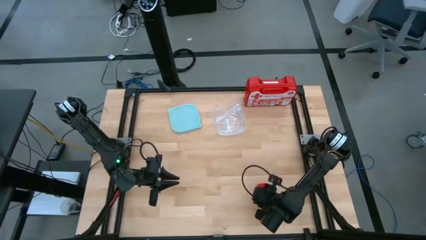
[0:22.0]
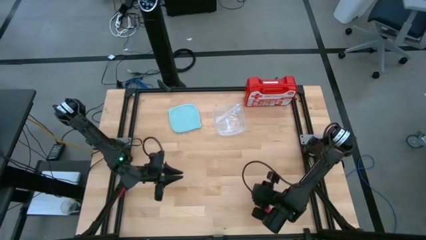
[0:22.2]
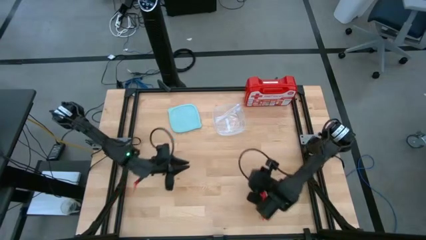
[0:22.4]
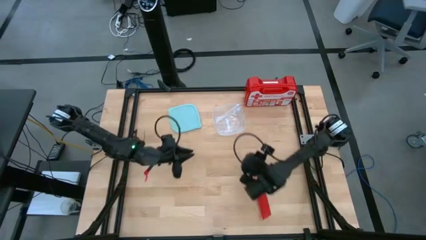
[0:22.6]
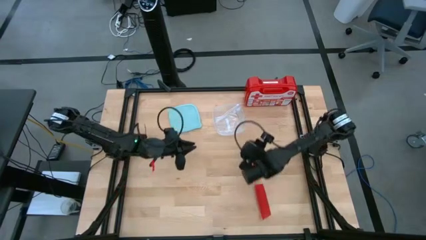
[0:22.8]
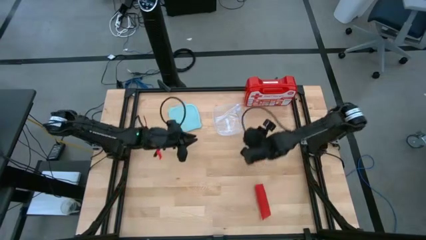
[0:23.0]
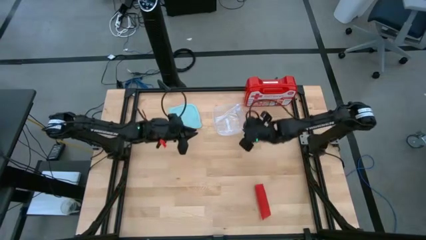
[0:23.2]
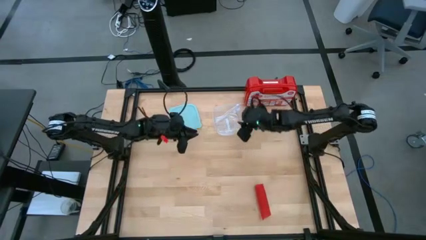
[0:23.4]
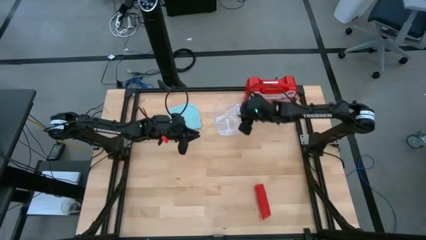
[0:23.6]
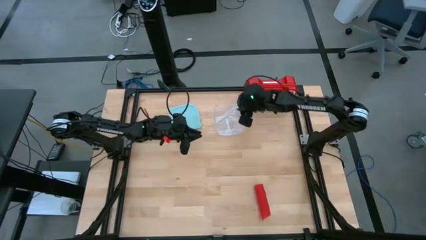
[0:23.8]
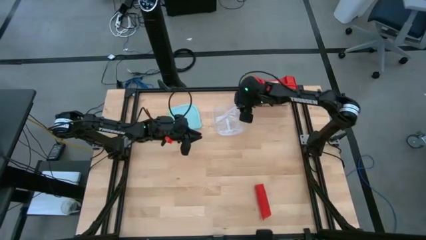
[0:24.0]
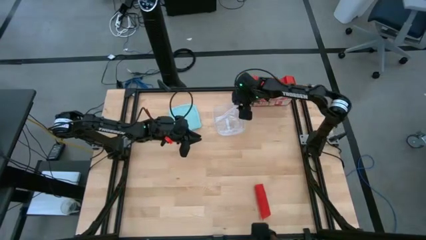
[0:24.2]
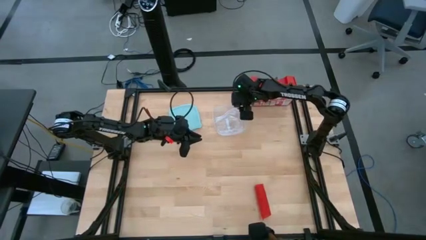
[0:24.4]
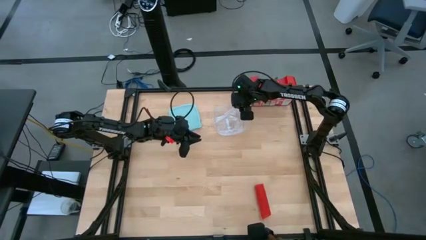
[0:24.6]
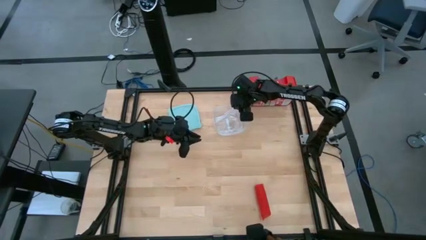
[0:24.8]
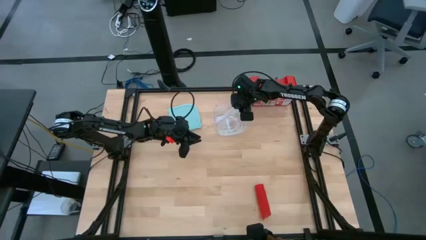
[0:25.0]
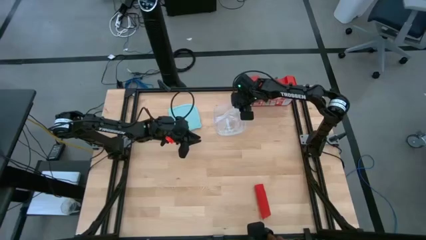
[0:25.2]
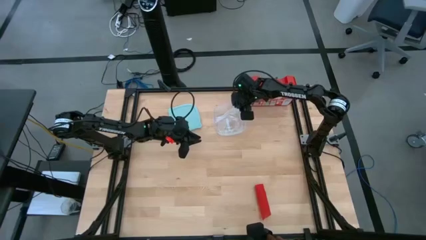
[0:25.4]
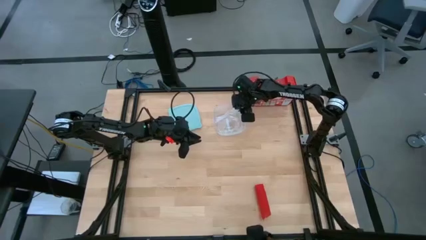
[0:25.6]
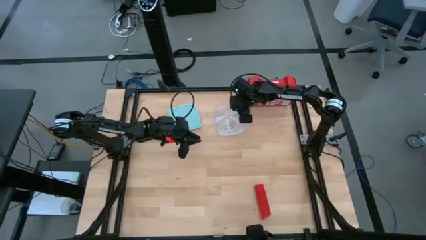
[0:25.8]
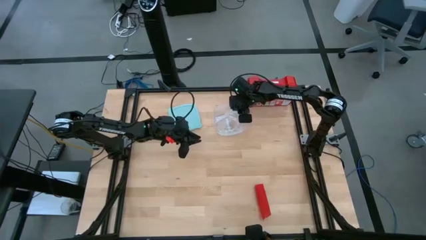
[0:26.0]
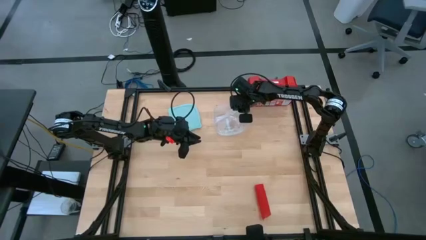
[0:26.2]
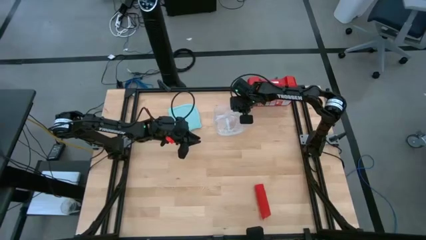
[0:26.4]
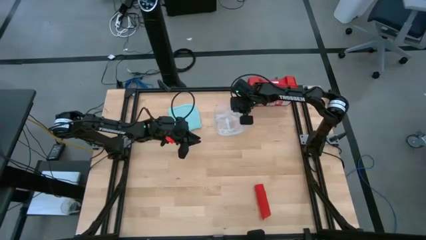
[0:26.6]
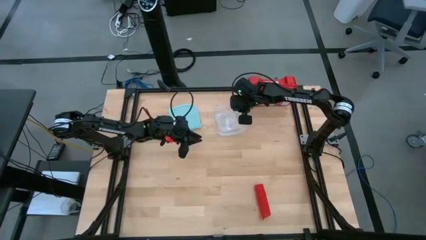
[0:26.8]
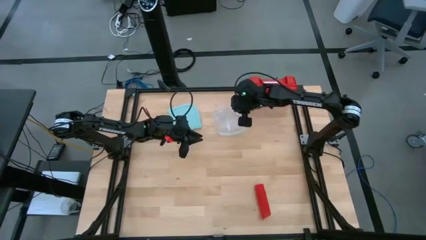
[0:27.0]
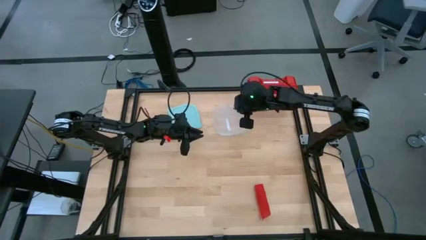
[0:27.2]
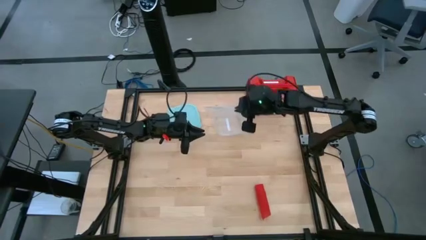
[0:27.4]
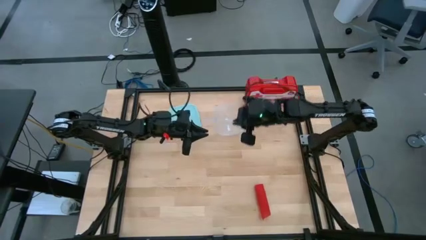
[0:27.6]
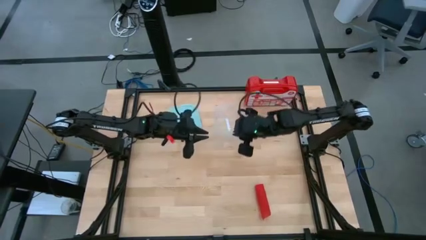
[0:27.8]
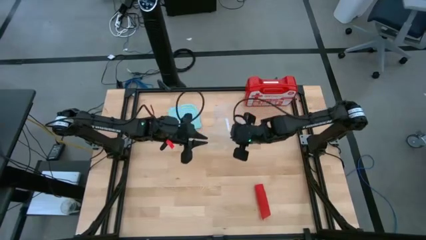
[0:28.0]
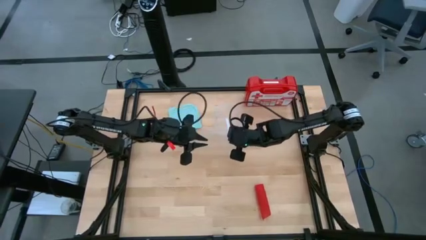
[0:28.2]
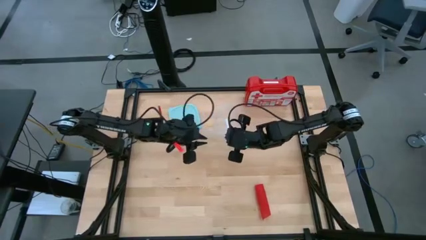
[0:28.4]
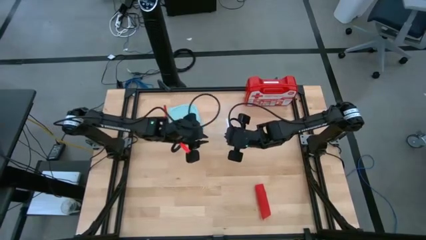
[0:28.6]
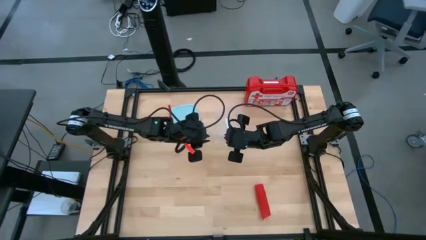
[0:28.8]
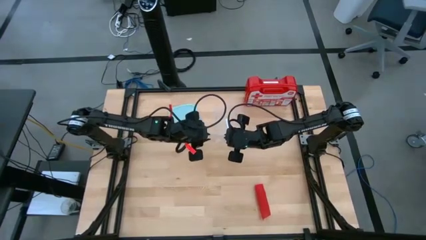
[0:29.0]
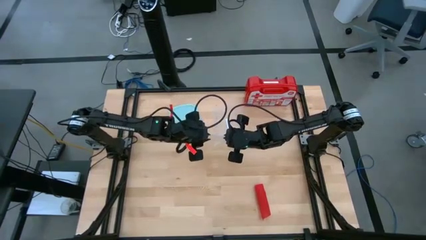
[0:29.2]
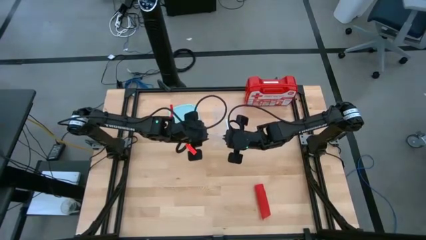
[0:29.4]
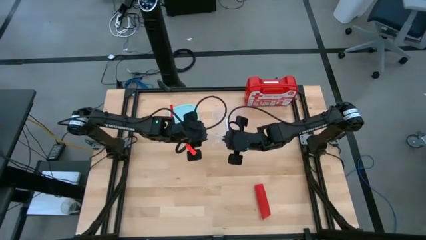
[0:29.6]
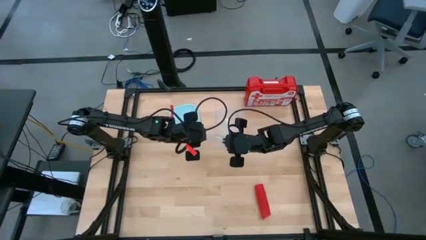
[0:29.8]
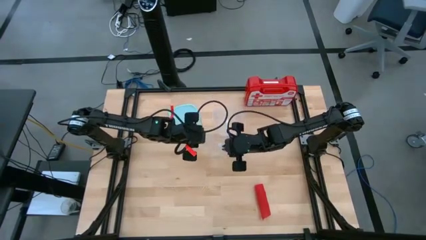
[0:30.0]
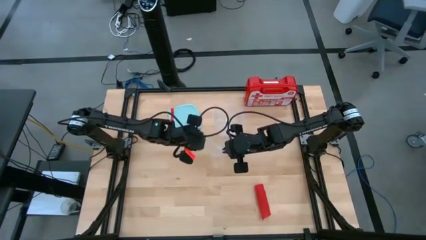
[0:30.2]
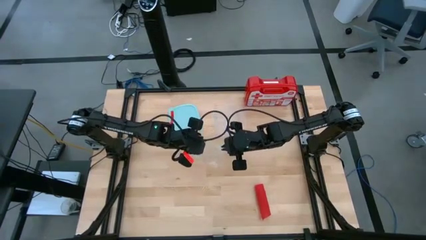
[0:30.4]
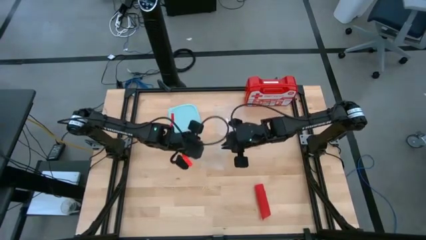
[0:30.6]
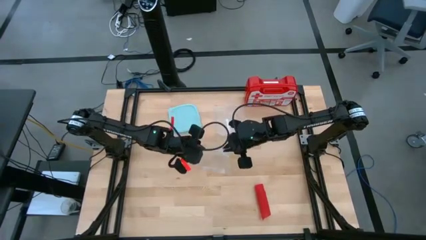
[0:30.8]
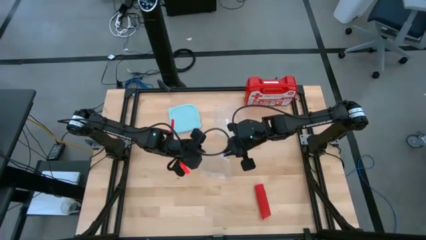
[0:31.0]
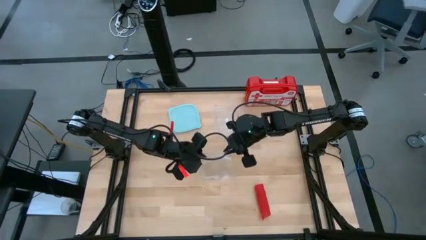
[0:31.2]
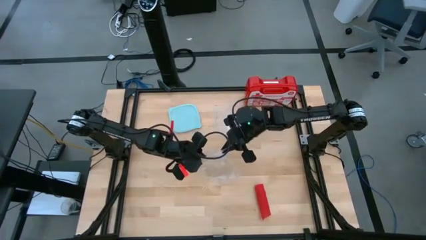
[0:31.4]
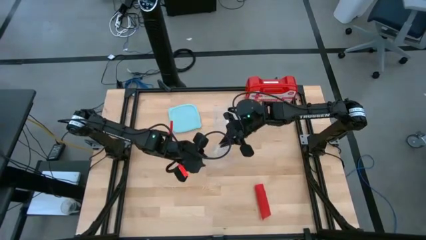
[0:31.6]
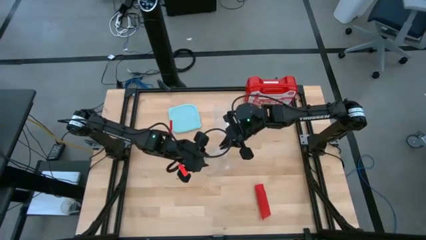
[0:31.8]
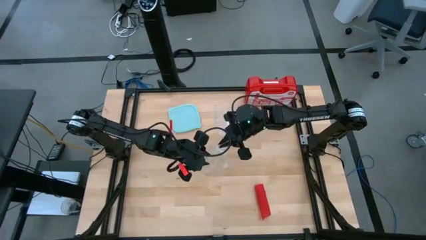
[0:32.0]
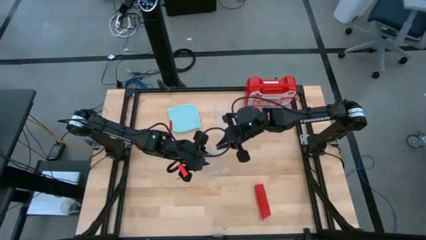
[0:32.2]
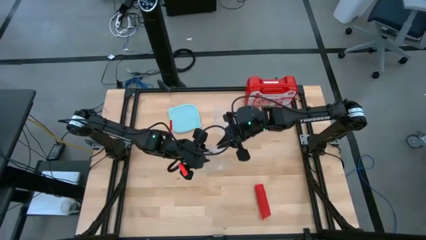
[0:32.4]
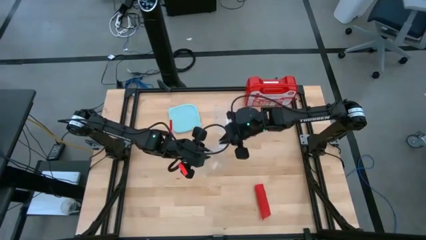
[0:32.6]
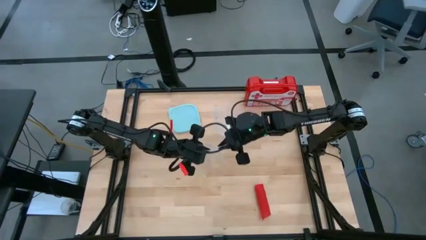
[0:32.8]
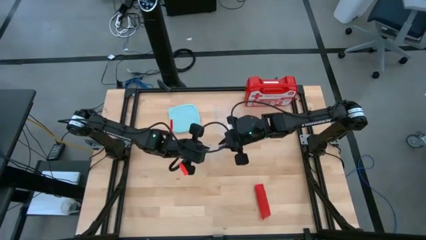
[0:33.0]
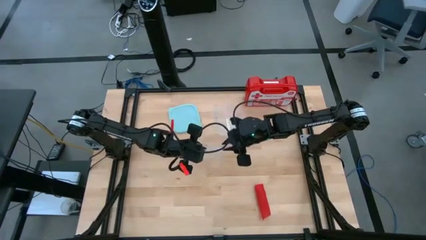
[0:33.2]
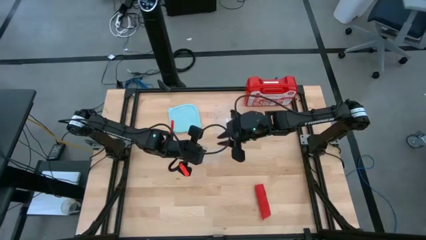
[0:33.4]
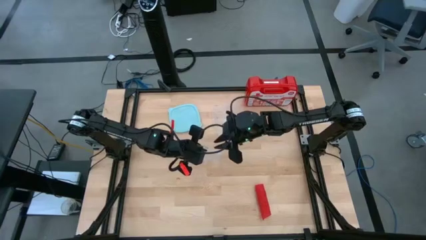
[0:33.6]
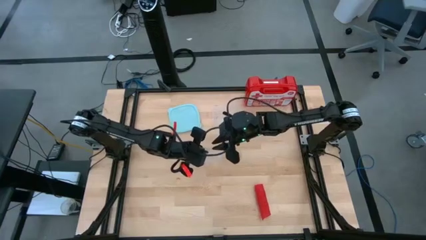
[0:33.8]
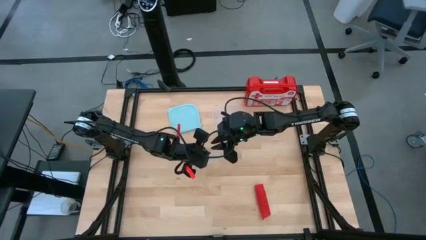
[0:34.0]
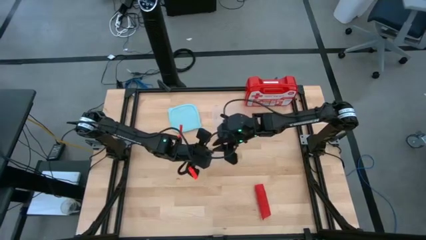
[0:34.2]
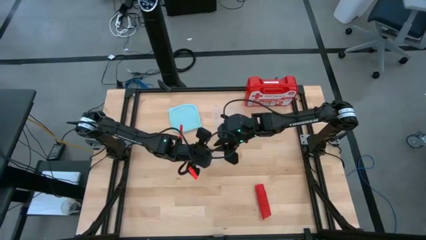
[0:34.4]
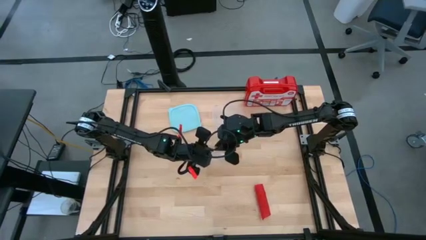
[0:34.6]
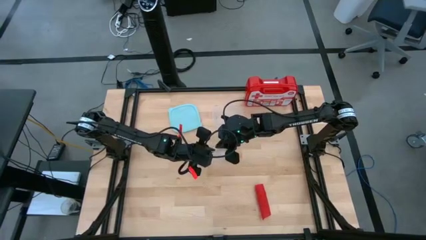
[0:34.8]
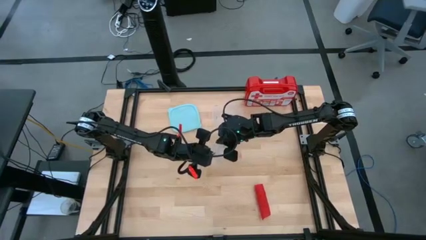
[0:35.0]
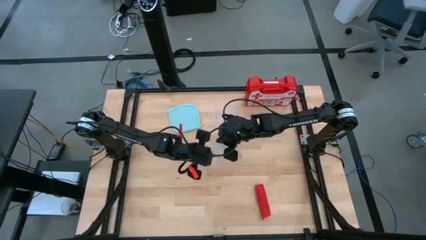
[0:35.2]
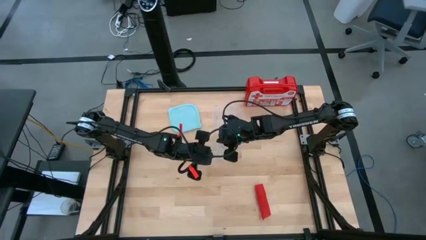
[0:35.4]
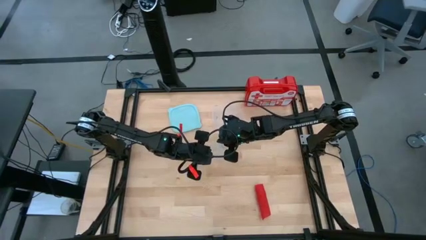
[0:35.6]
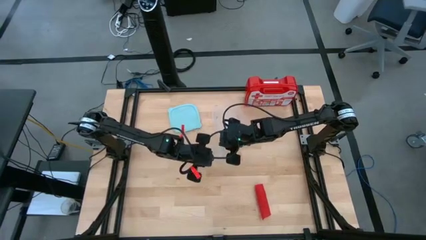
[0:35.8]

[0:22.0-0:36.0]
Task: Roll bandage
Open the transparent zip bag
